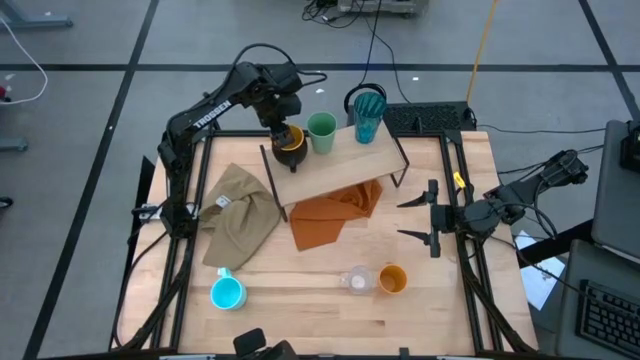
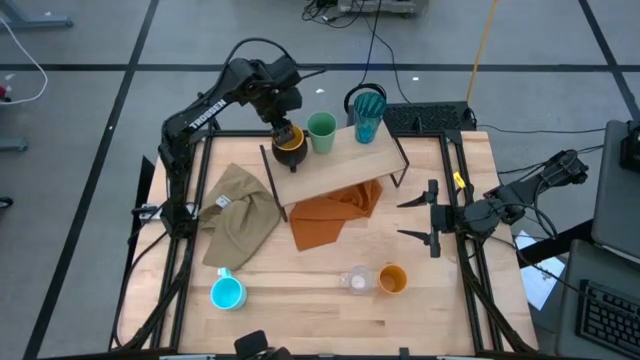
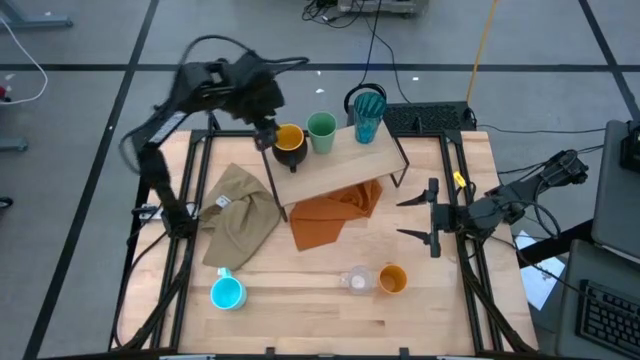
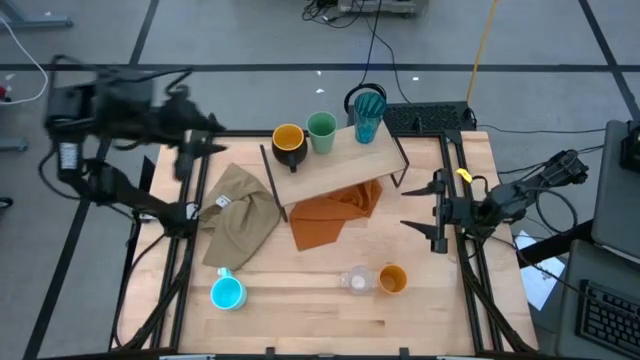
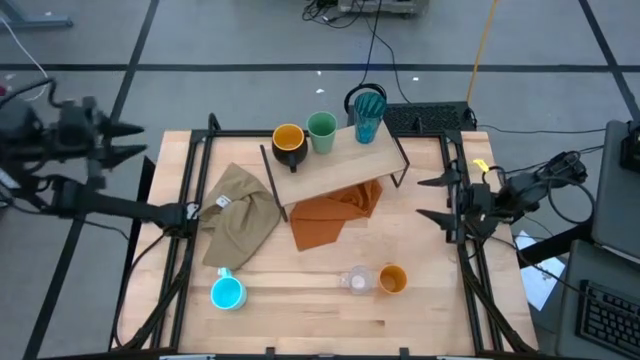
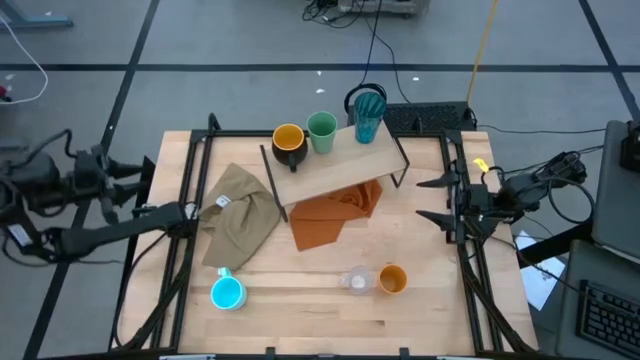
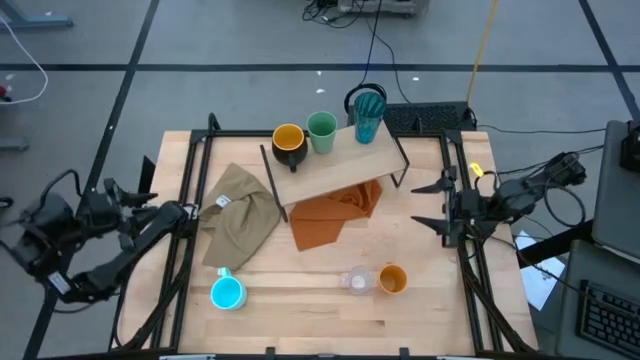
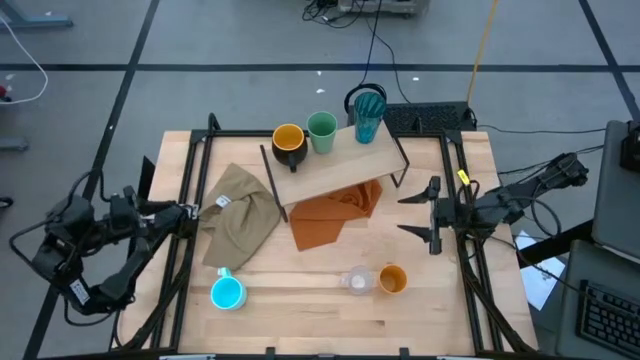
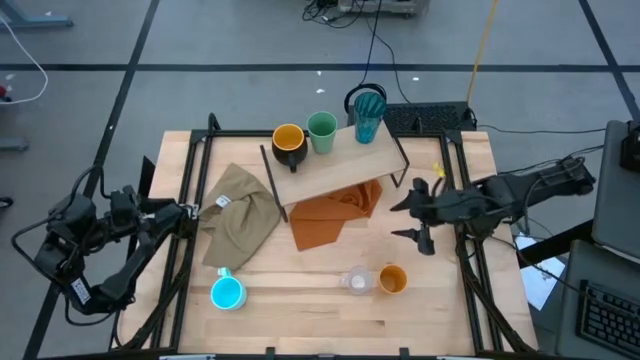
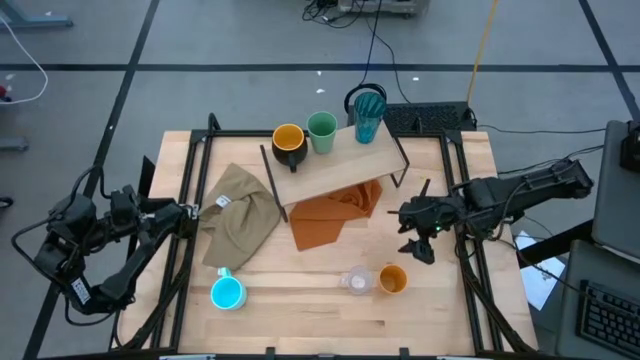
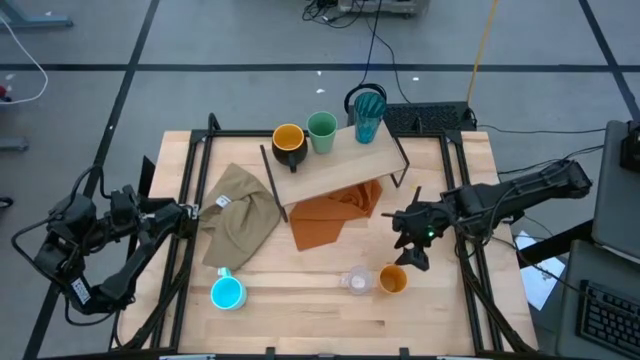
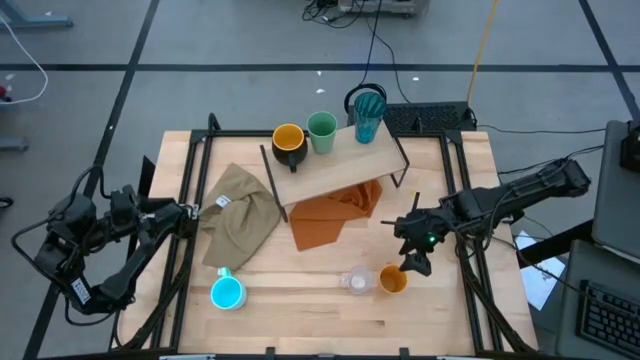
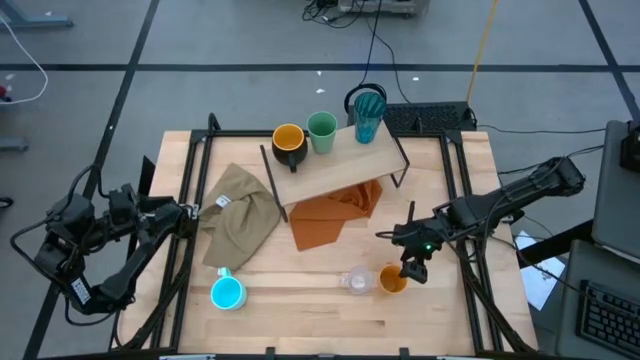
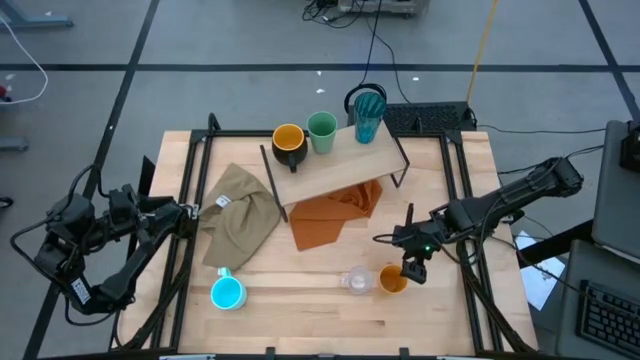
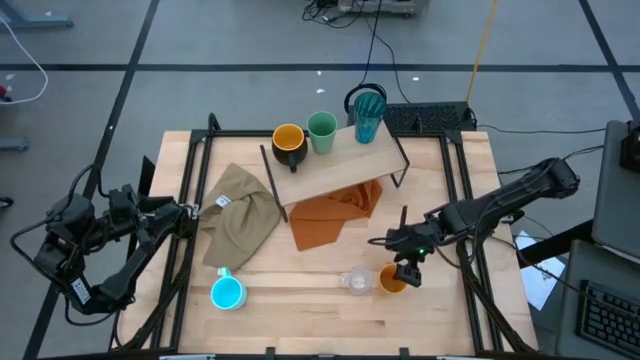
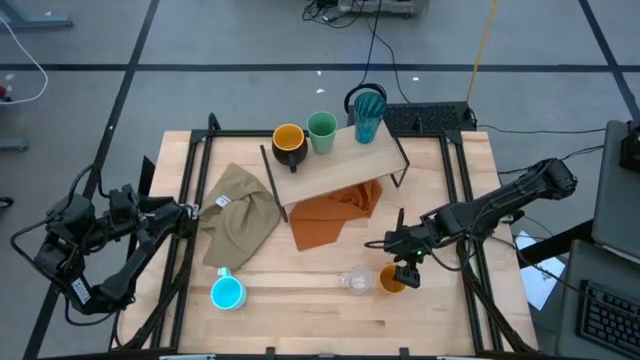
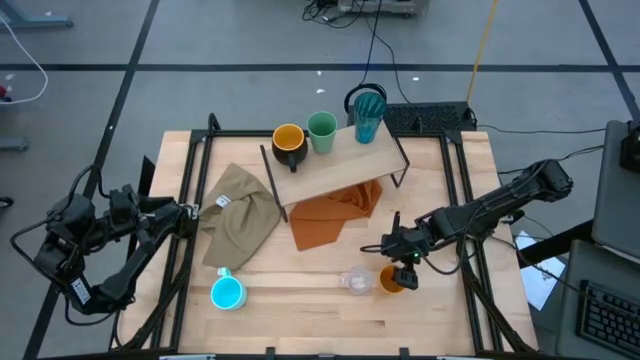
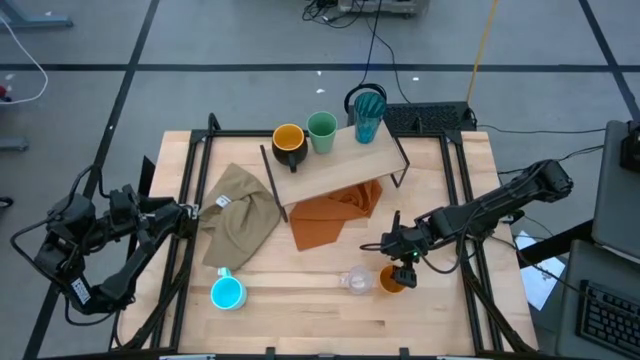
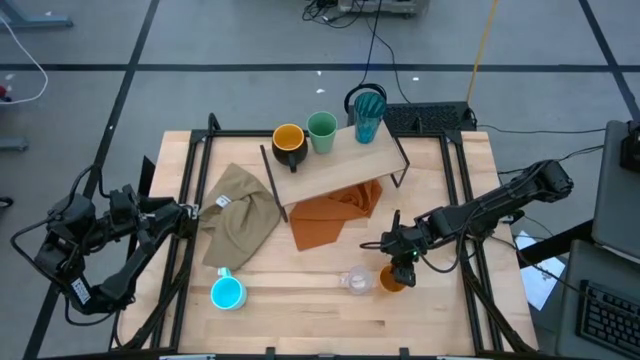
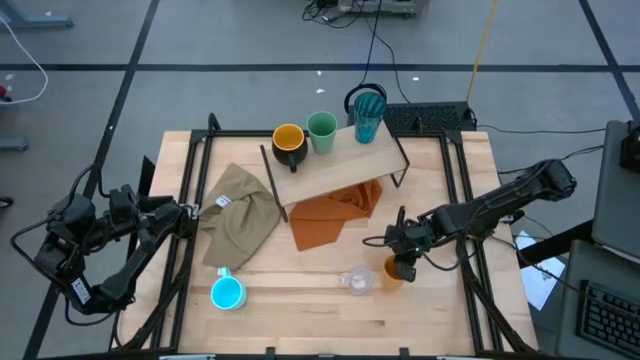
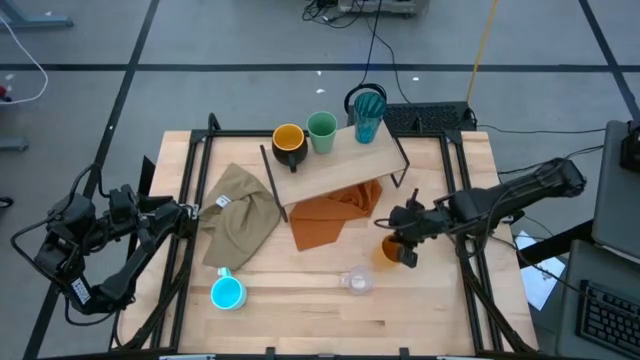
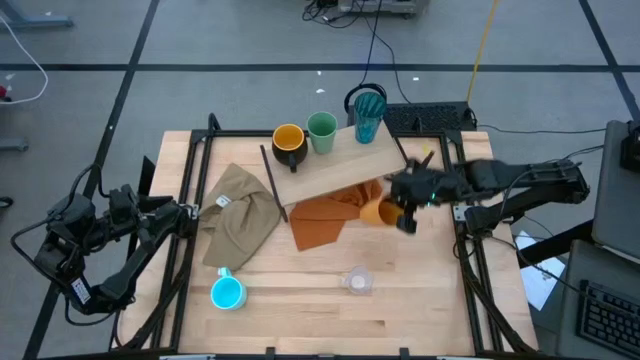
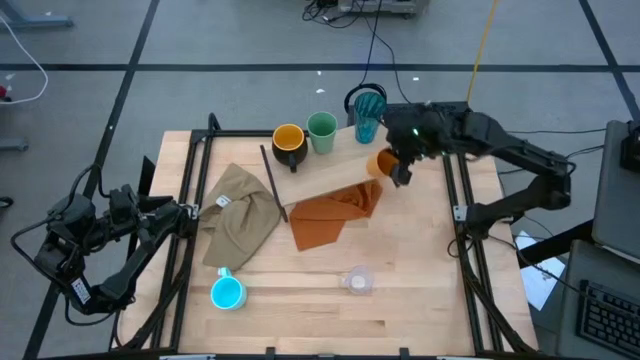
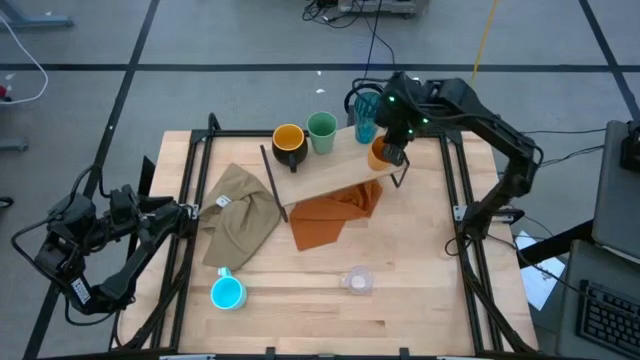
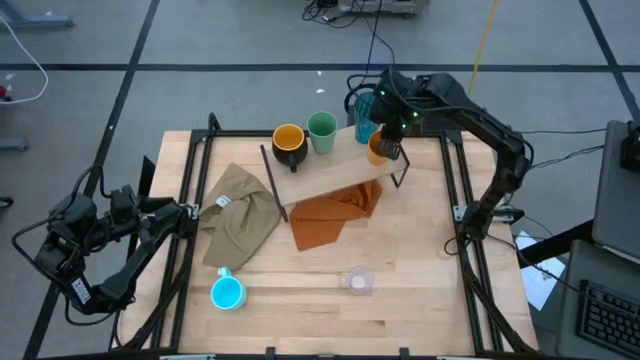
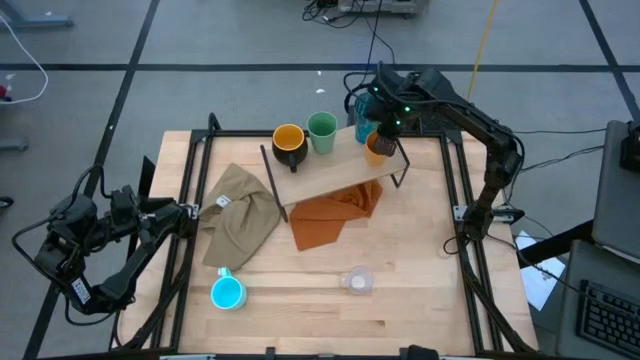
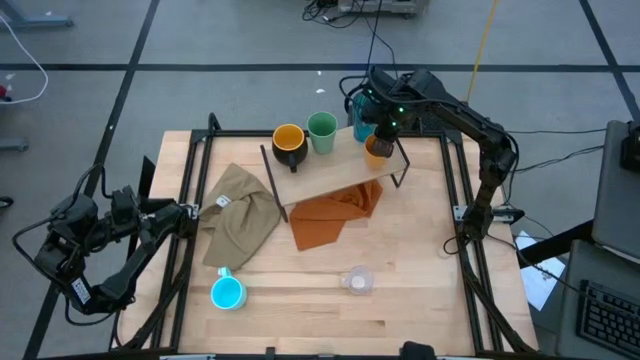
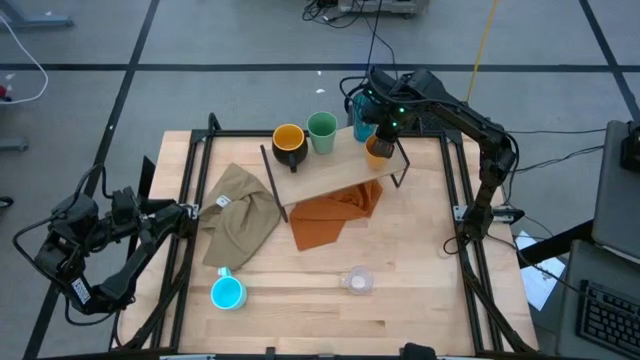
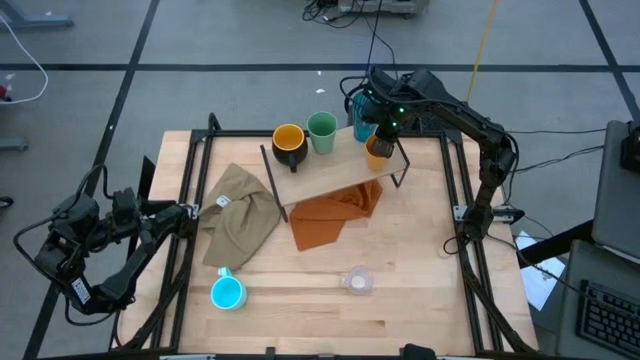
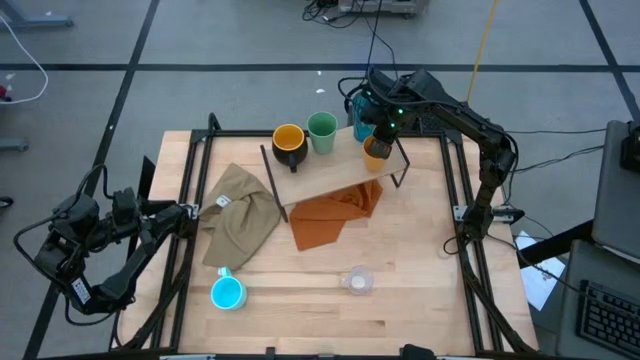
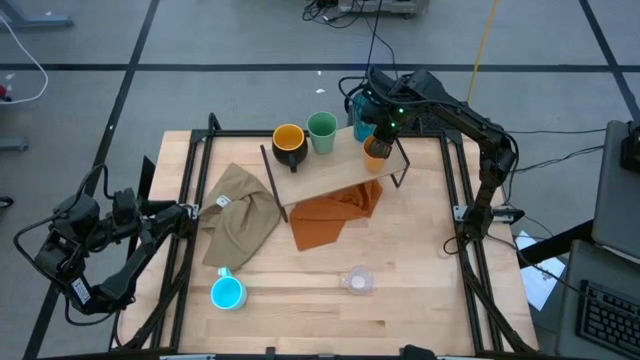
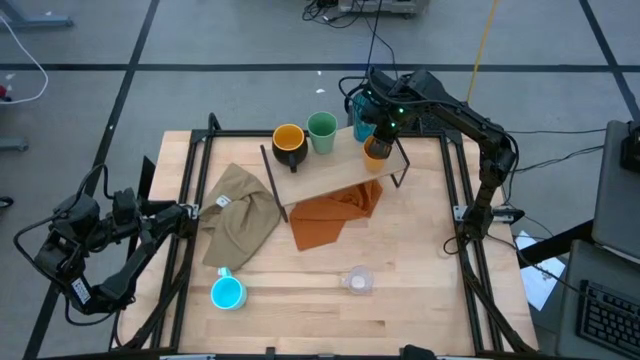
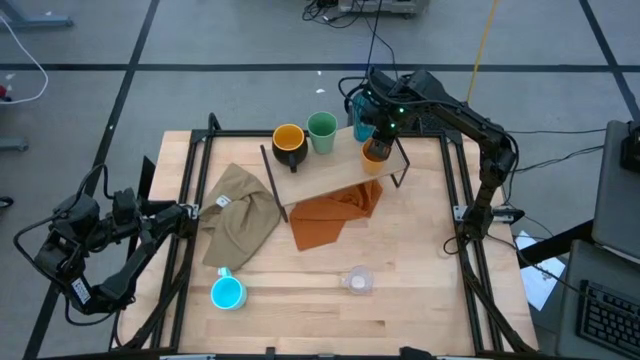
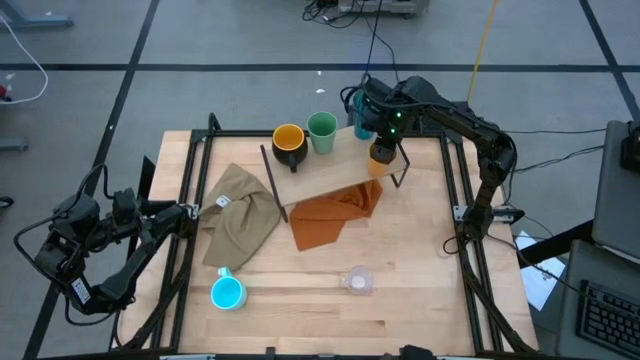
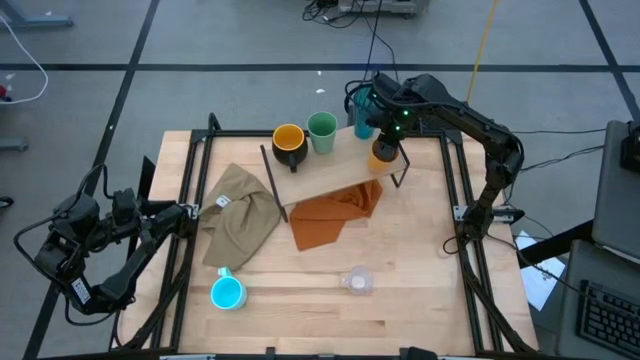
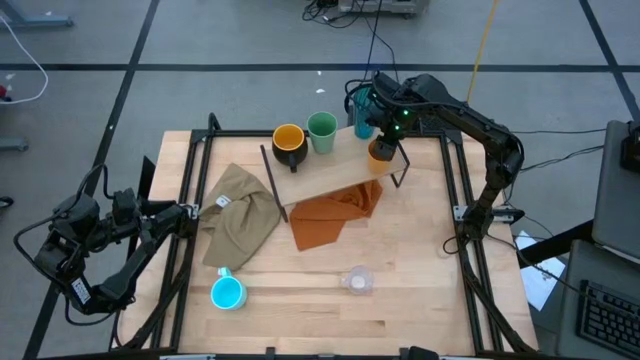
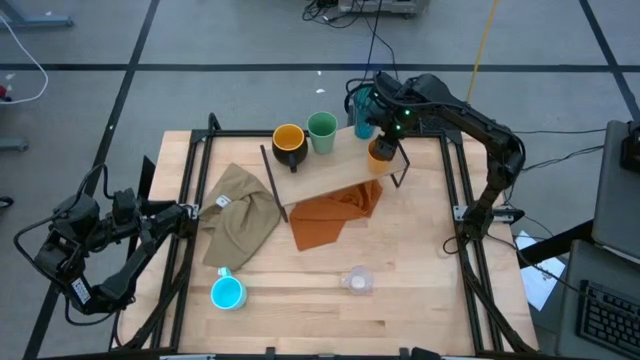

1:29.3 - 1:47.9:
Task: Stack small to large cups/mugs on shelf
Put the yellow cup on the shelf

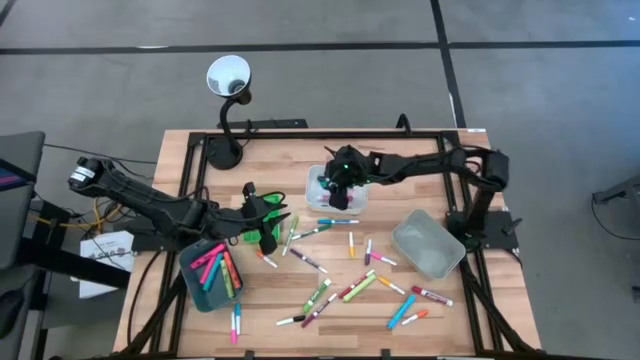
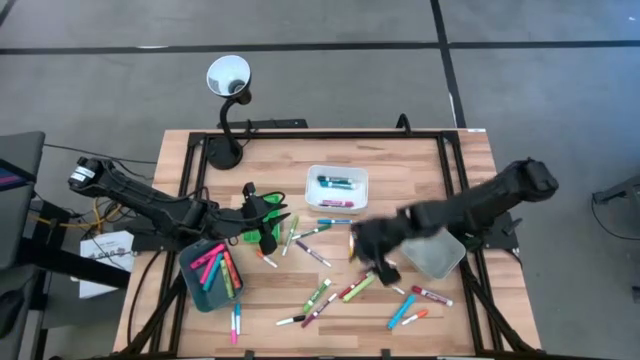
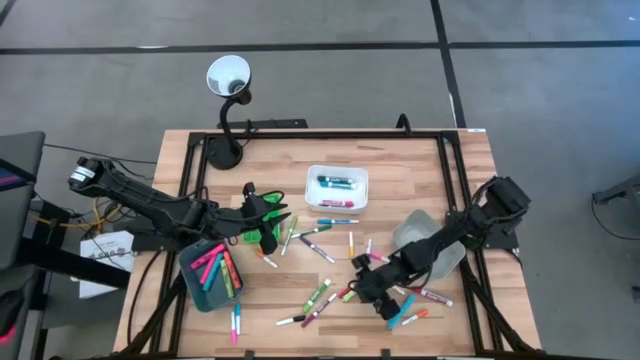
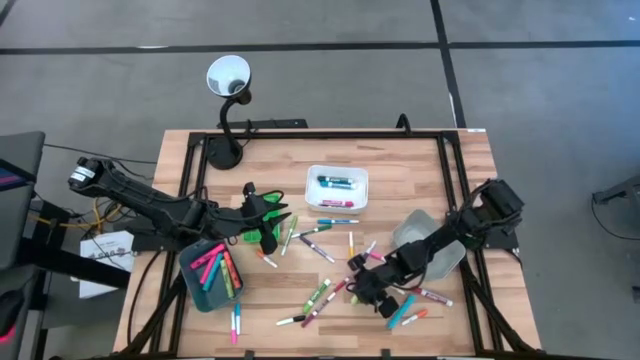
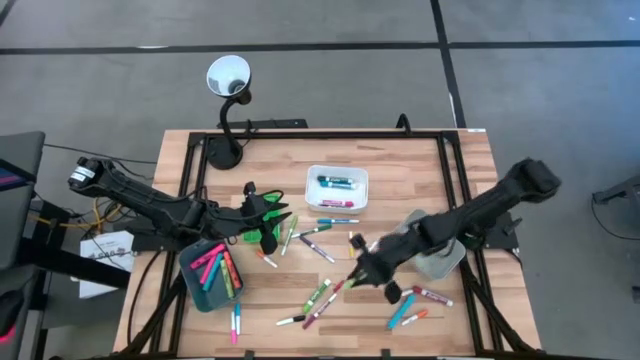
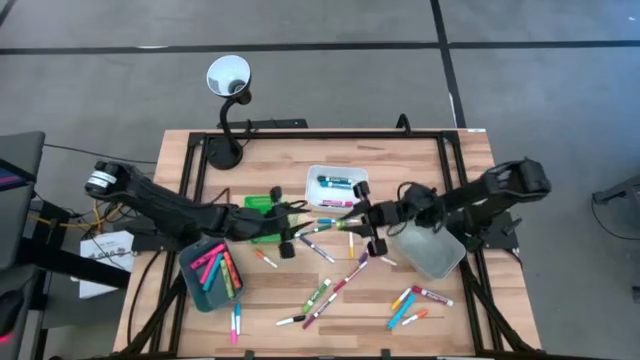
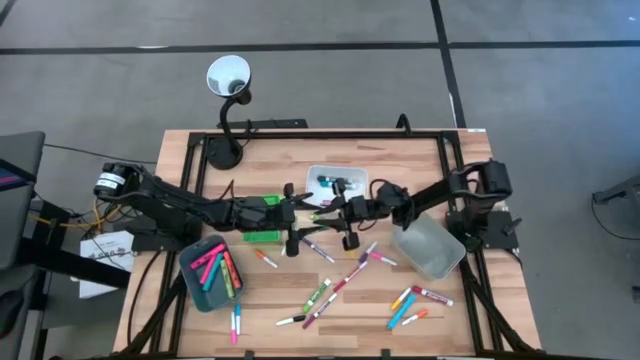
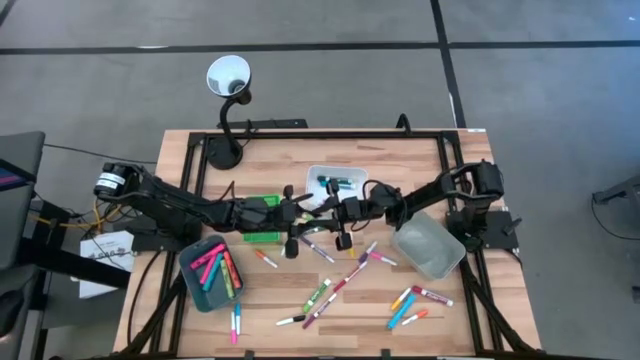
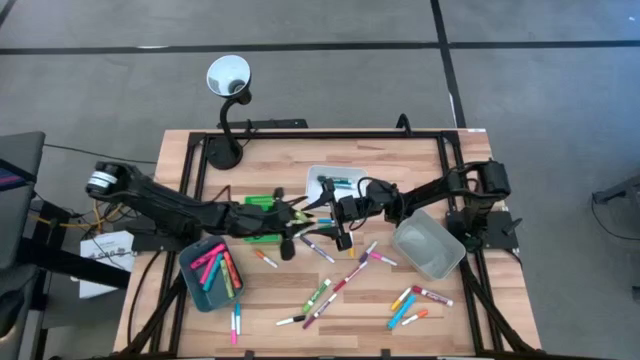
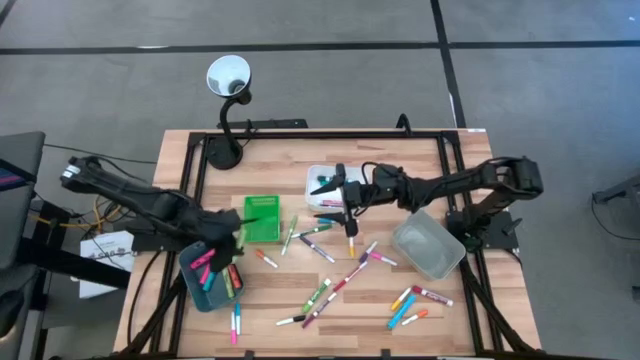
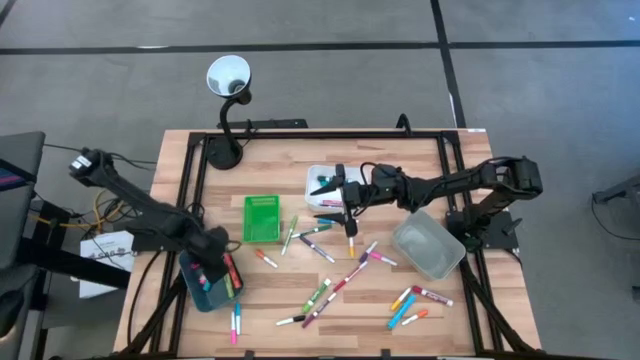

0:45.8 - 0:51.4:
Task: Pick & Place Markers
Put the big light green highlighter pen into the blue bin
